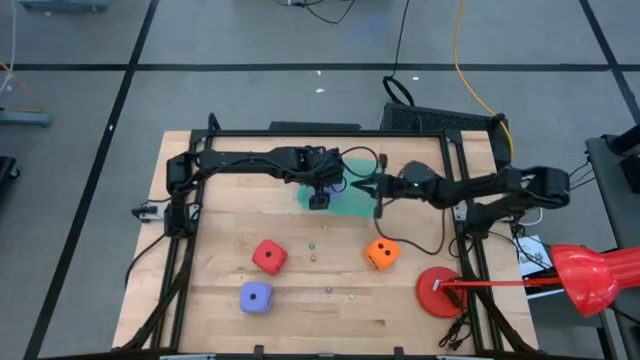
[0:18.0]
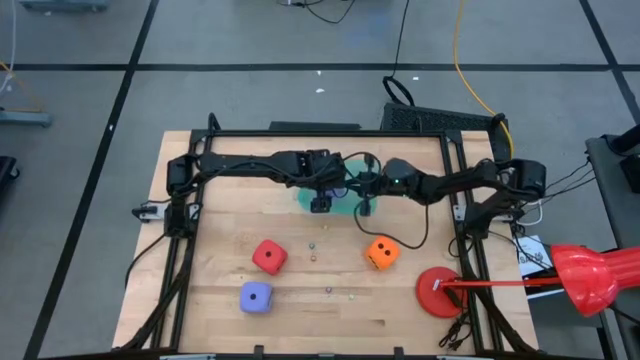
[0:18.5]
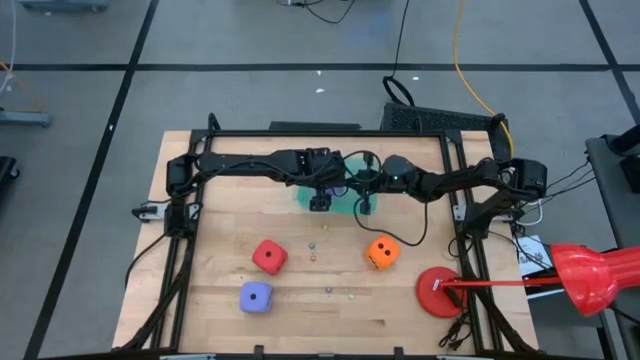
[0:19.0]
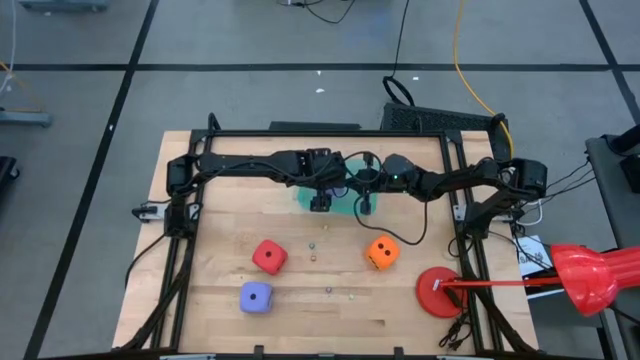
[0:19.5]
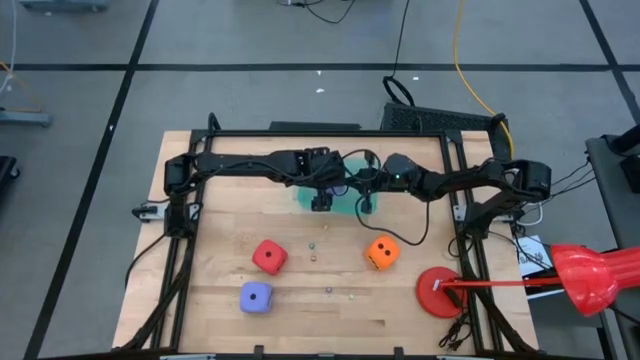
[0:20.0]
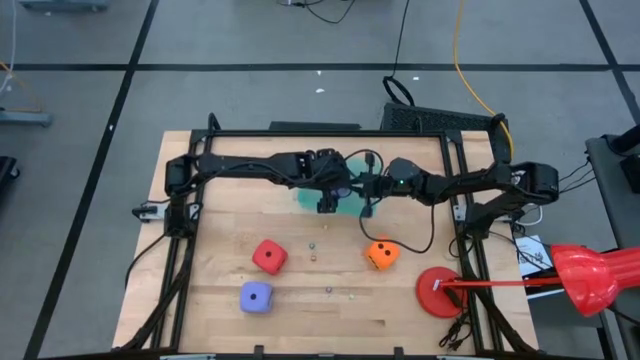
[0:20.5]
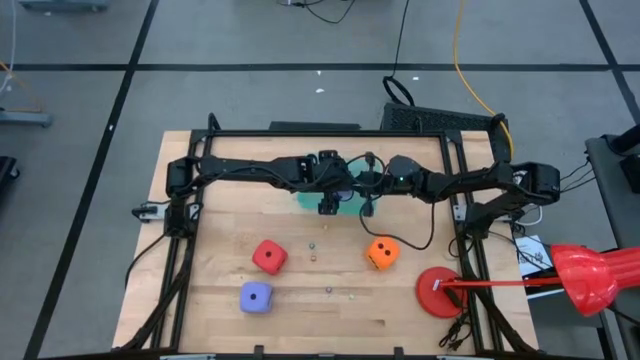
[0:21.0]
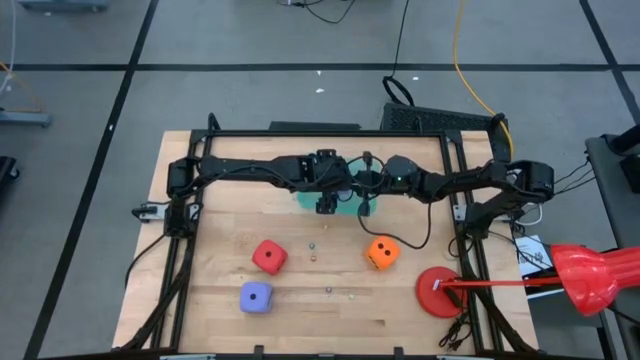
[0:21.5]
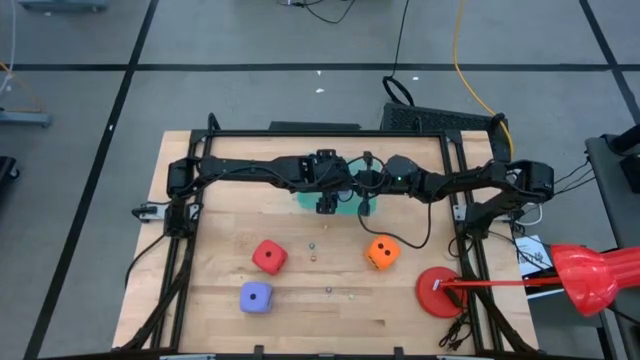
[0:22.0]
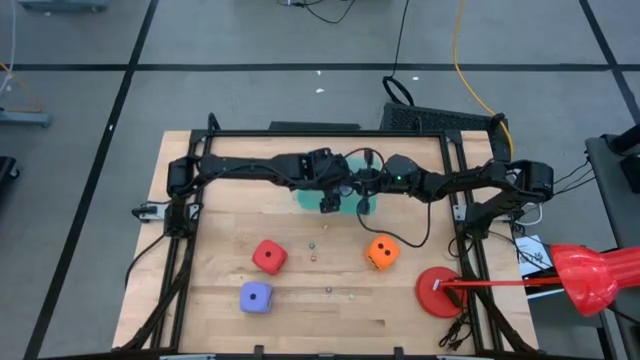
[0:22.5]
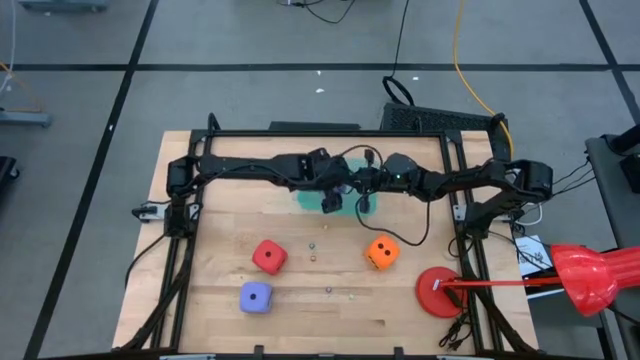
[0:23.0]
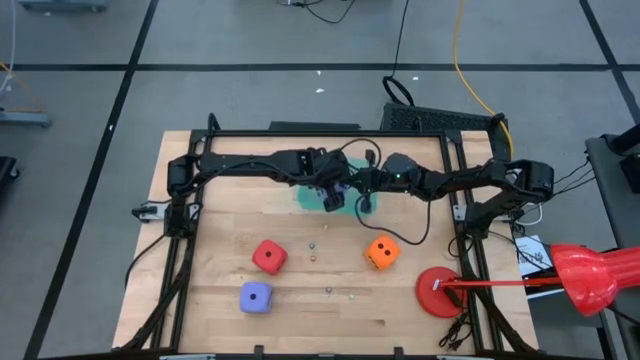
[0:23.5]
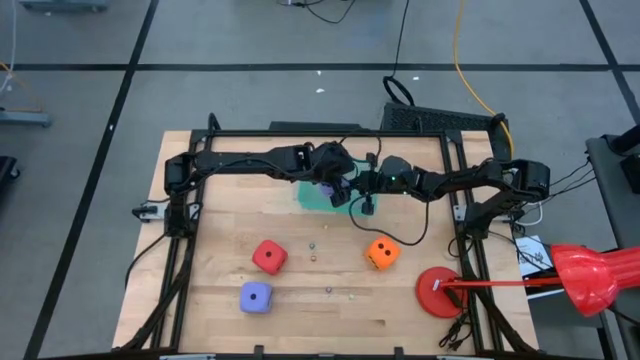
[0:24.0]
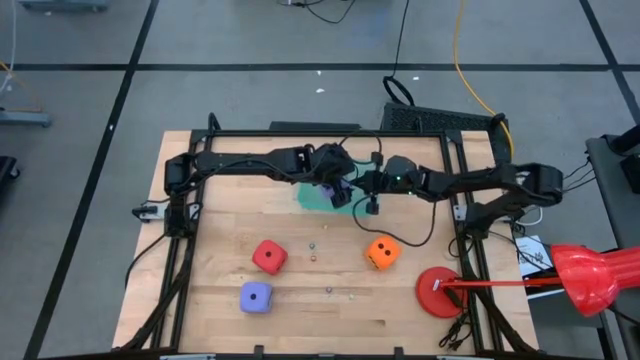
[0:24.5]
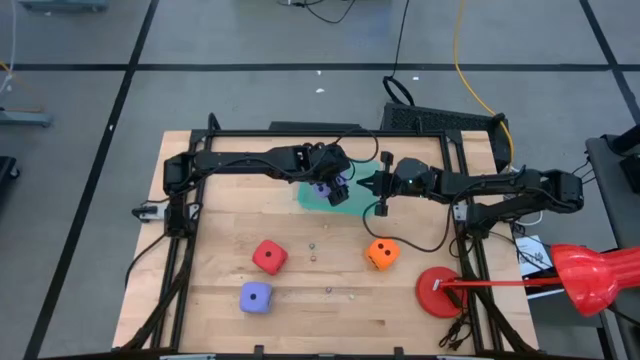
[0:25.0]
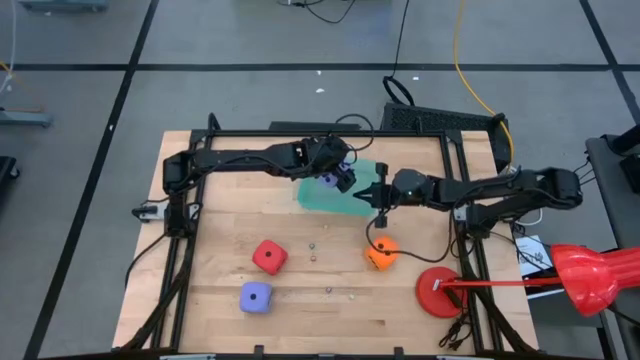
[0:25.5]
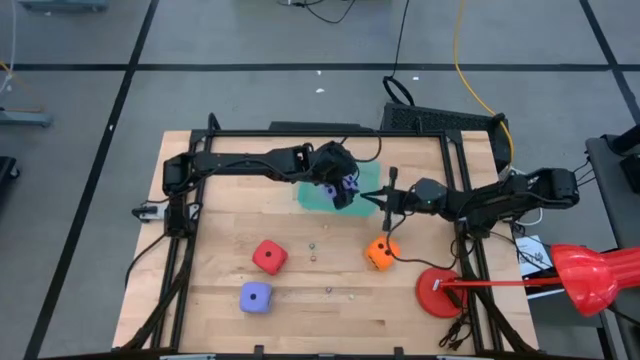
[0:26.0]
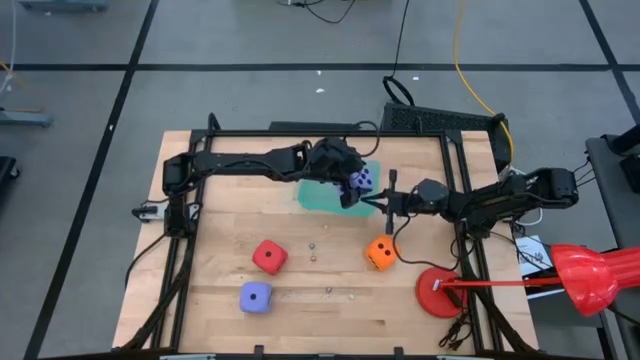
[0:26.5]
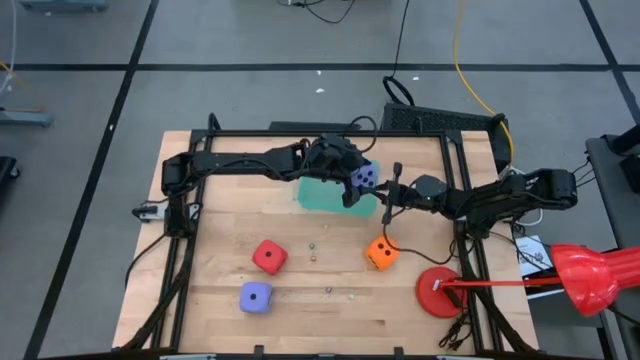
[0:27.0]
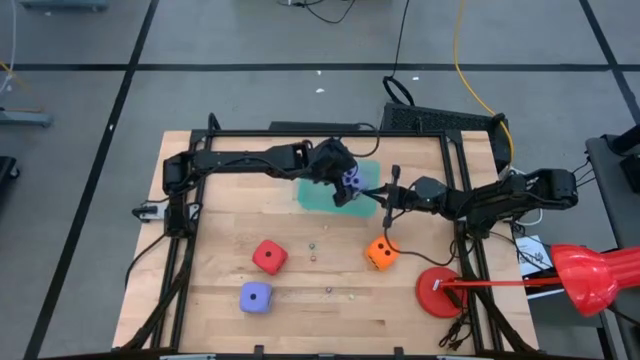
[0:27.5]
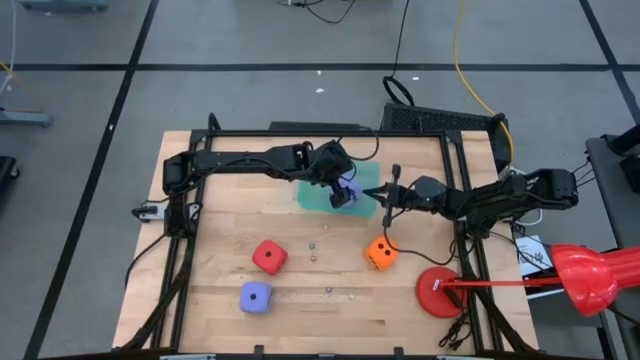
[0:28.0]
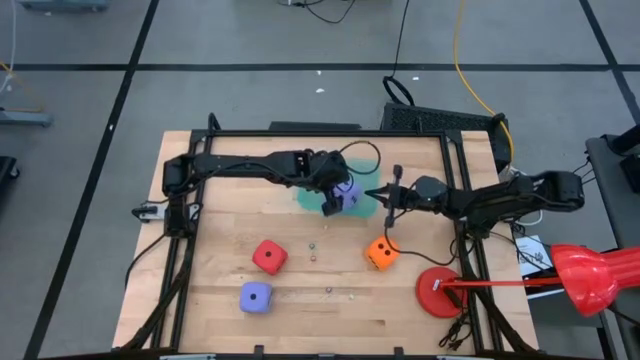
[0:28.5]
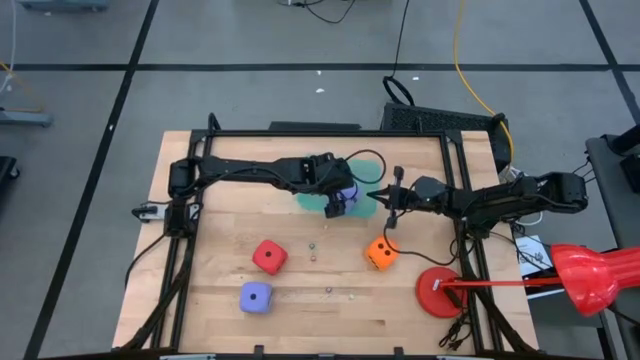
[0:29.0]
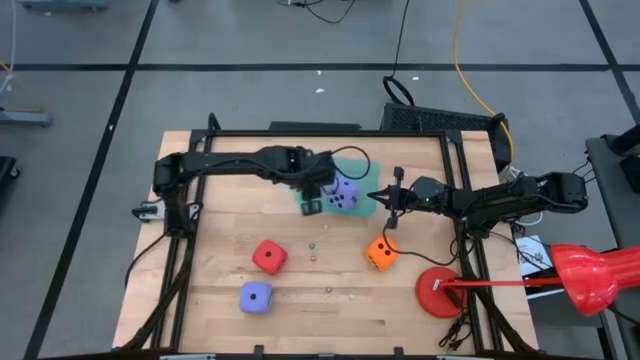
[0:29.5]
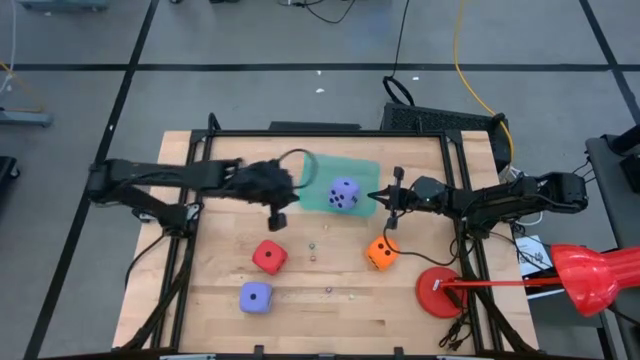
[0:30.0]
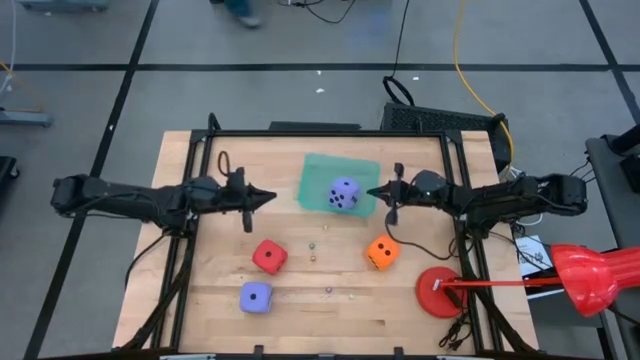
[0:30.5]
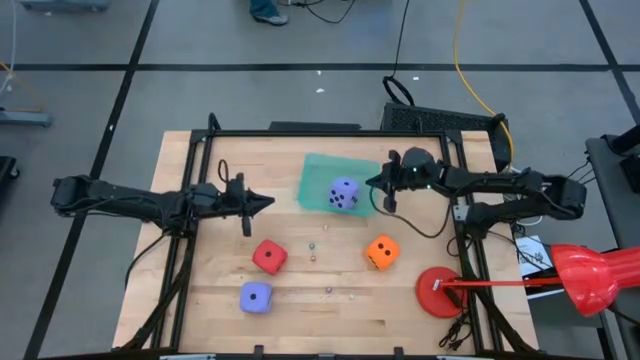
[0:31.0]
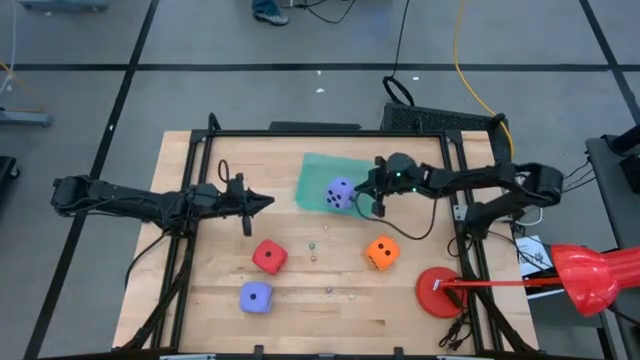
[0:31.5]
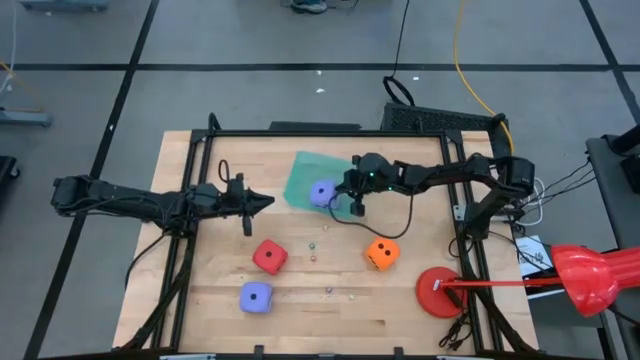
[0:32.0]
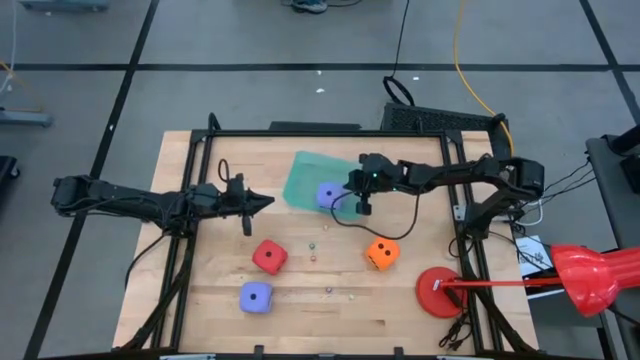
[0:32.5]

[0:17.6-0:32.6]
Task: Pick & Place Dice
Put the top large purple dice into the blue bin

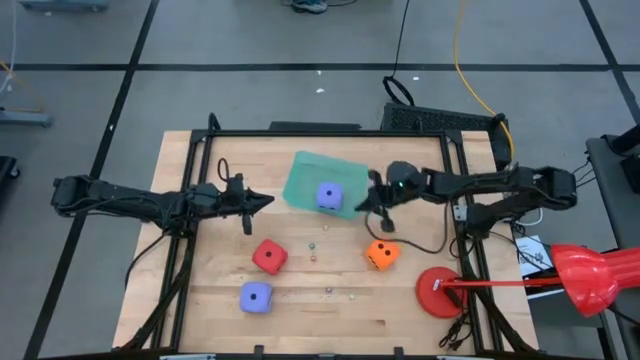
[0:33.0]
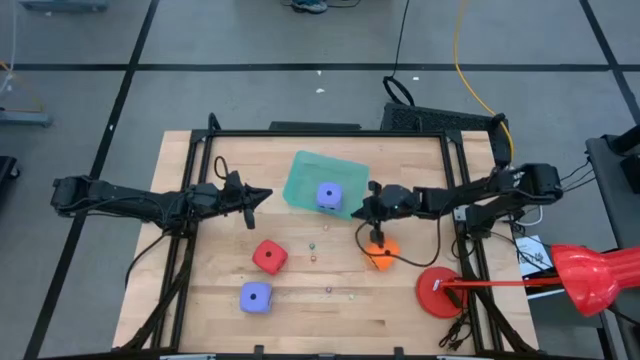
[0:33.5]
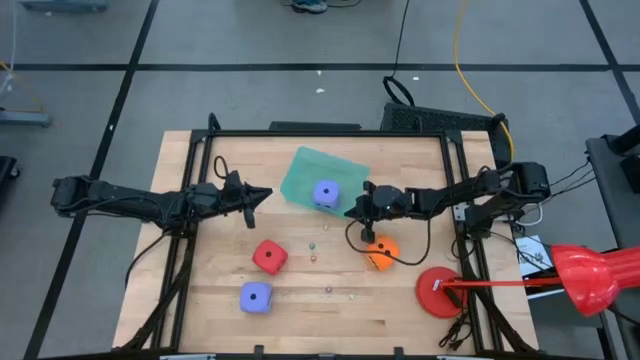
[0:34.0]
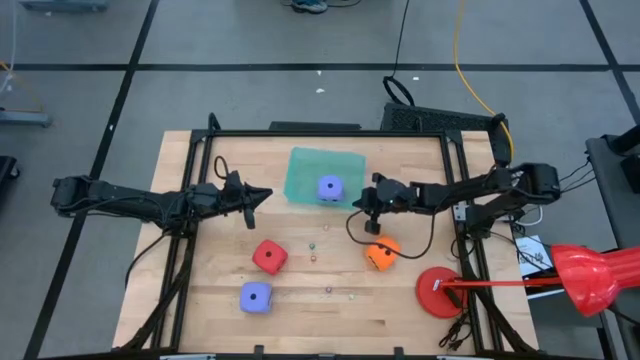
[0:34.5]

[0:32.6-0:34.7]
Adjust the blue bin

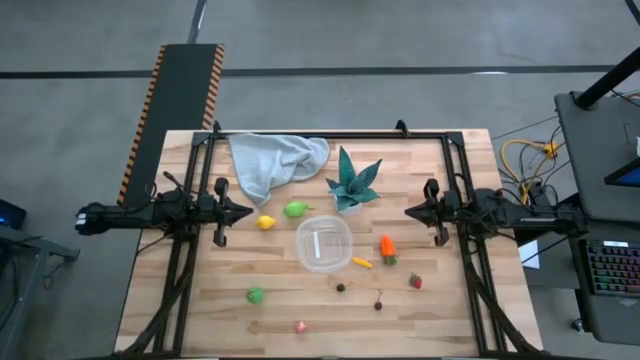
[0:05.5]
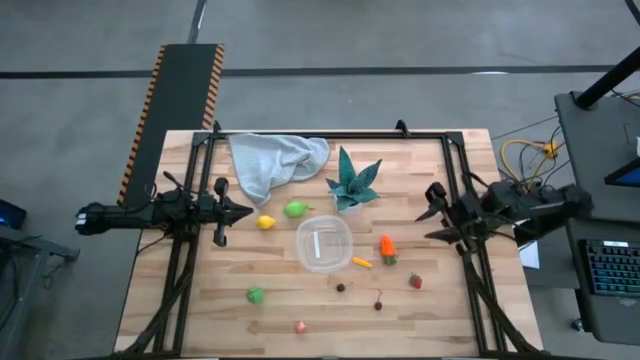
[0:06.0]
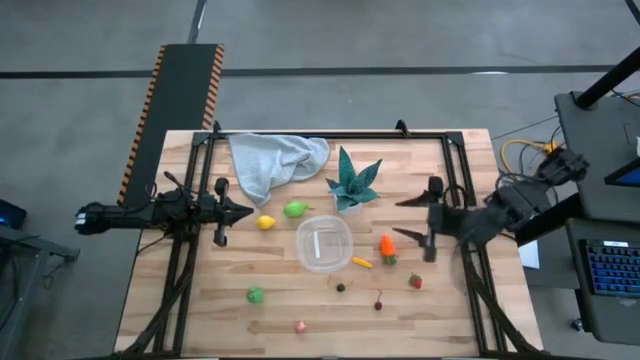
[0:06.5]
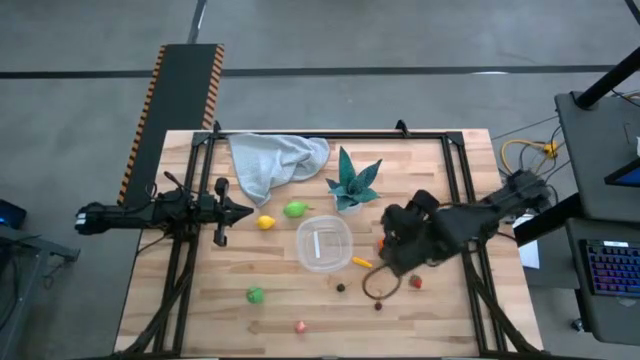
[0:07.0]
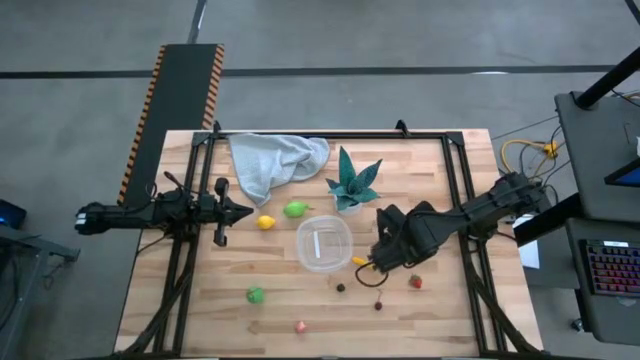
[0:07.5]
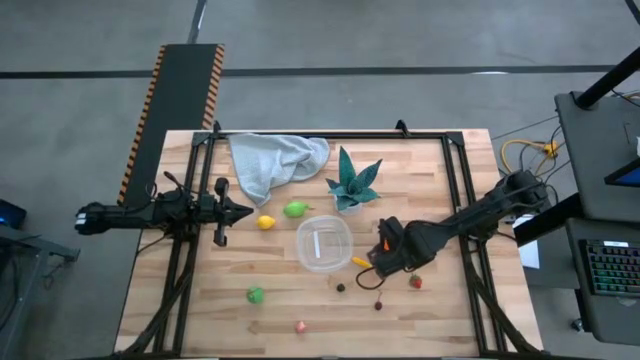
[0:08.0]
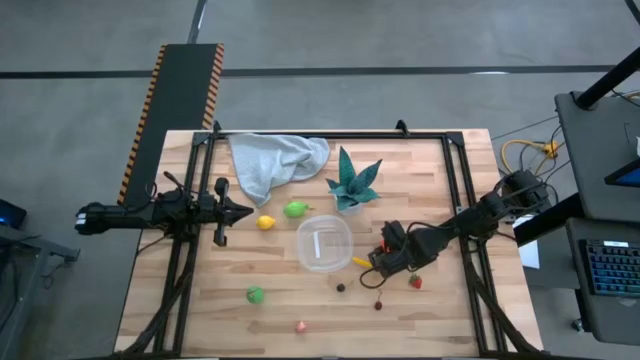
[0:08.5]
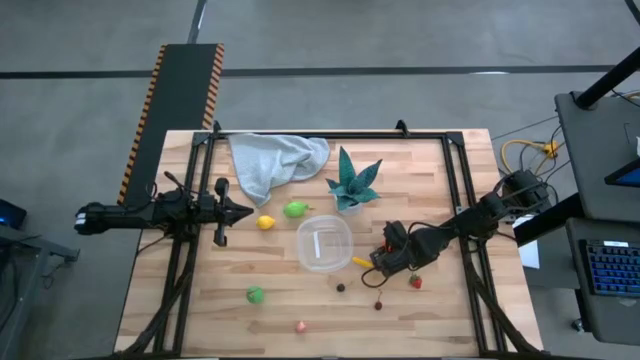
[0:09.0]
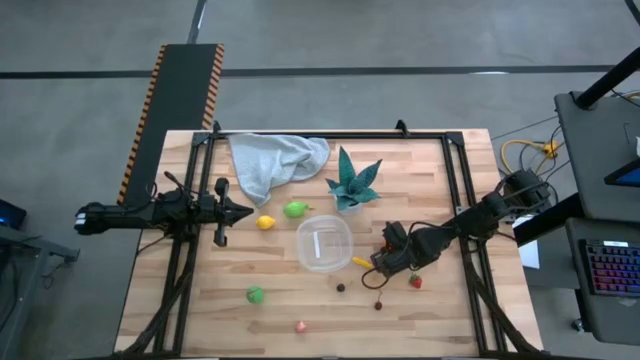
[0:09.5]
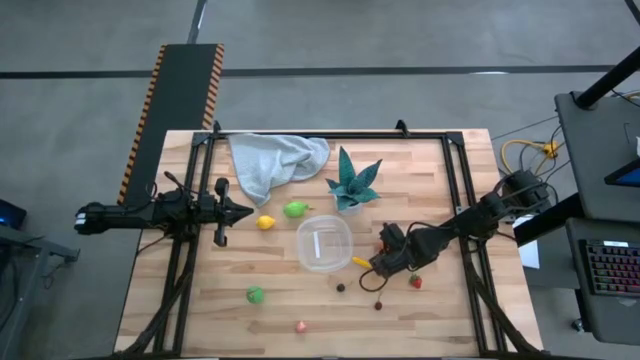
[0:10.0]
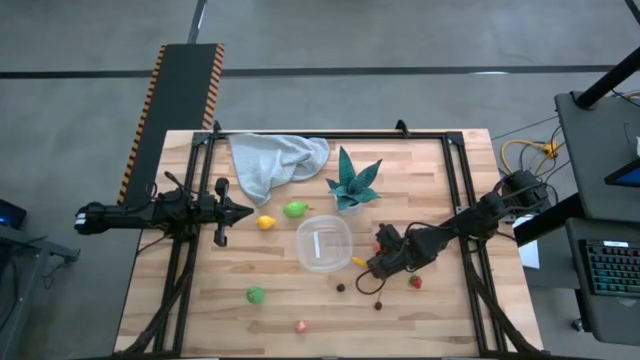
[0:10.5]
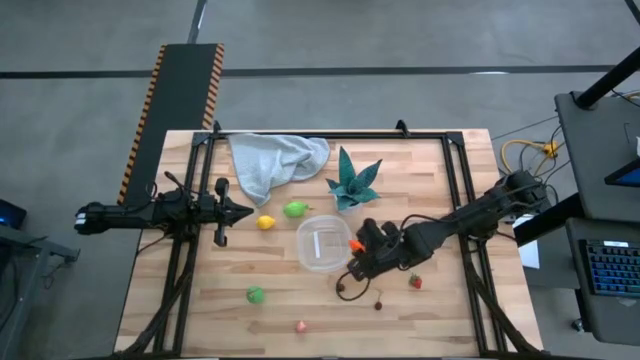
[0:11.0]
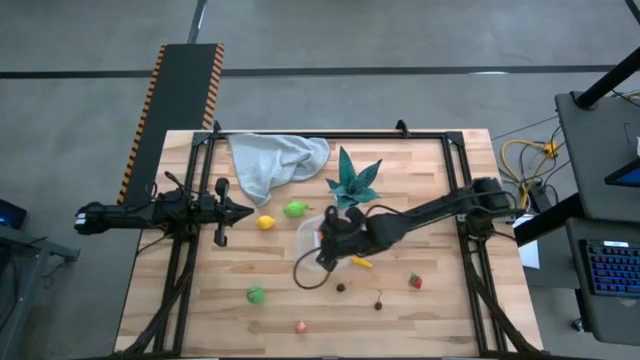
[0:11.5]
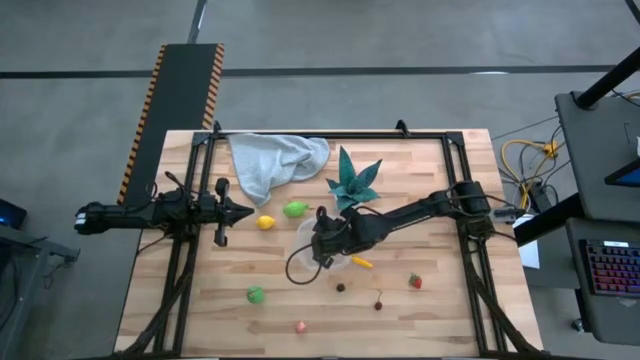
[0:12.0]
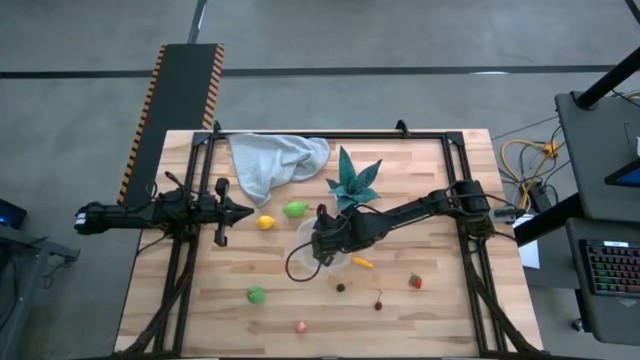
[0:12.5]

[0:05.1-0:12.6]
Task: Pick and placing Produce into tupperware
Put the carrot into the transparent bin
